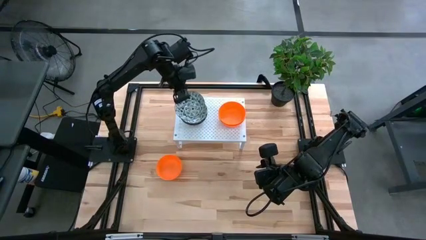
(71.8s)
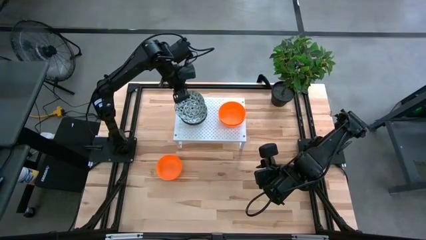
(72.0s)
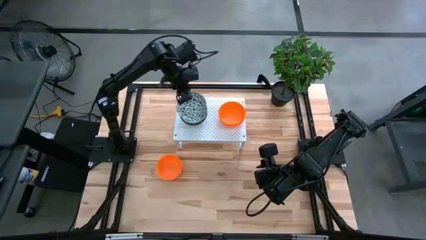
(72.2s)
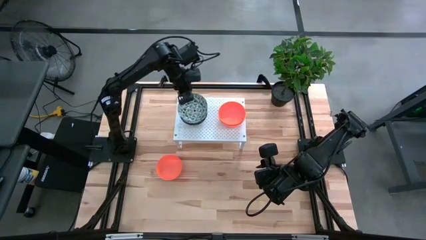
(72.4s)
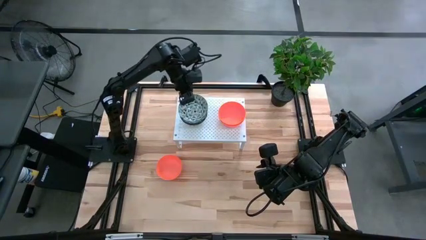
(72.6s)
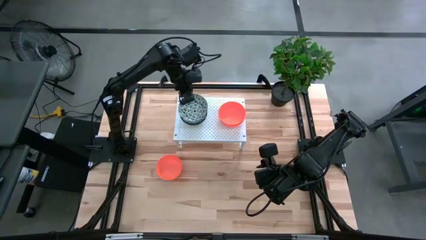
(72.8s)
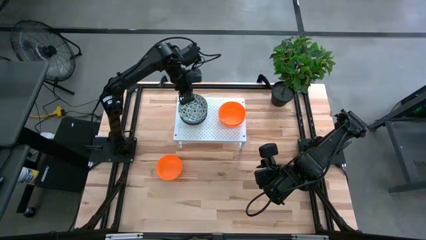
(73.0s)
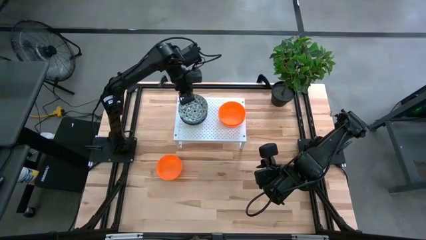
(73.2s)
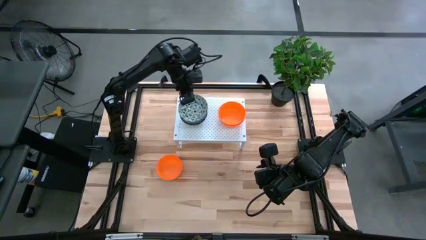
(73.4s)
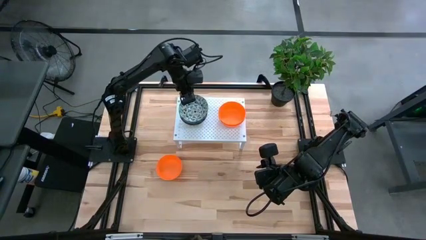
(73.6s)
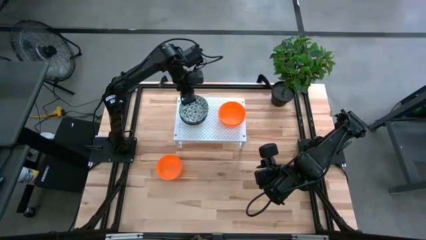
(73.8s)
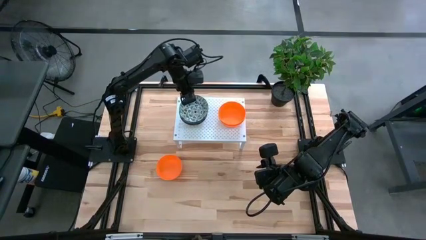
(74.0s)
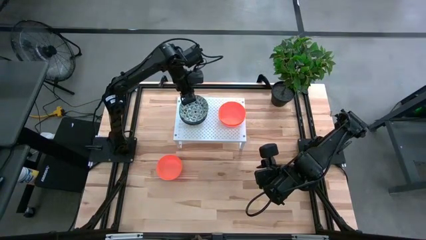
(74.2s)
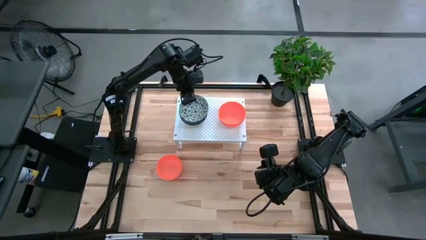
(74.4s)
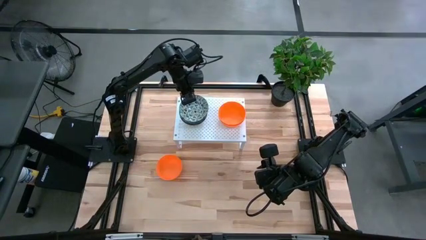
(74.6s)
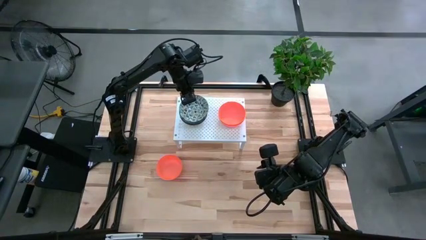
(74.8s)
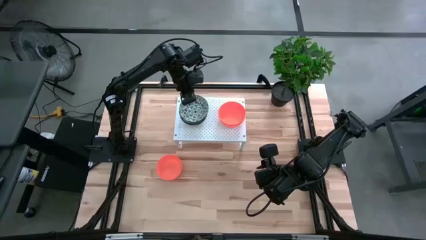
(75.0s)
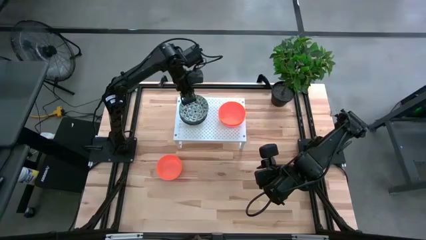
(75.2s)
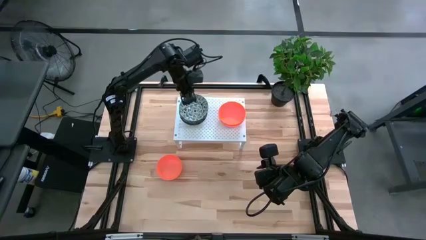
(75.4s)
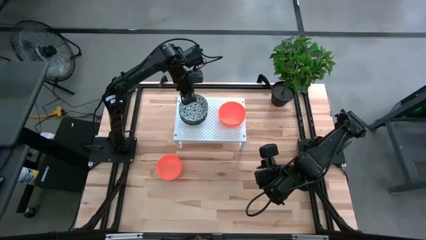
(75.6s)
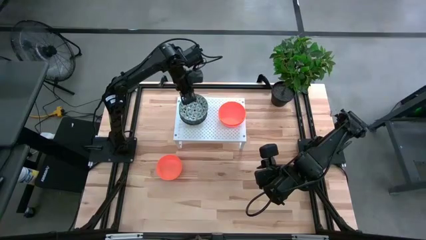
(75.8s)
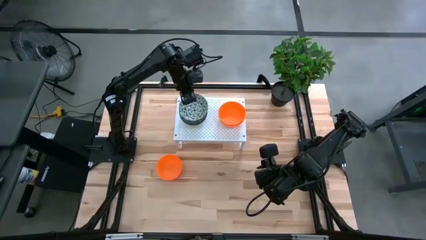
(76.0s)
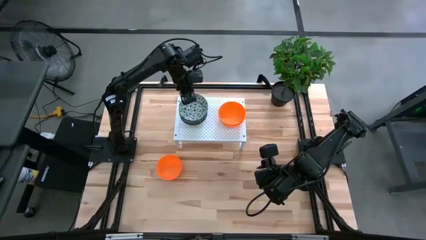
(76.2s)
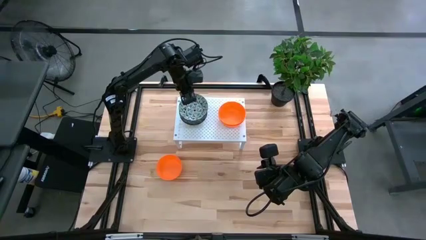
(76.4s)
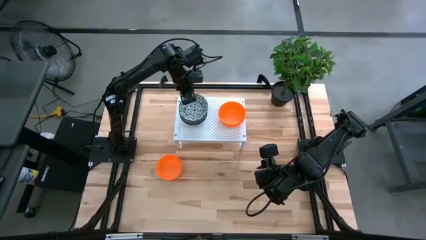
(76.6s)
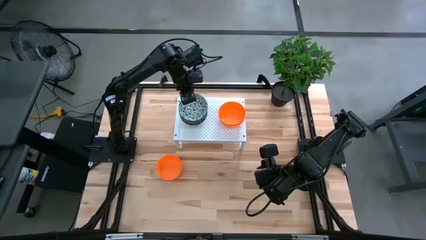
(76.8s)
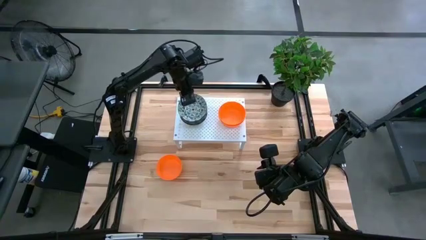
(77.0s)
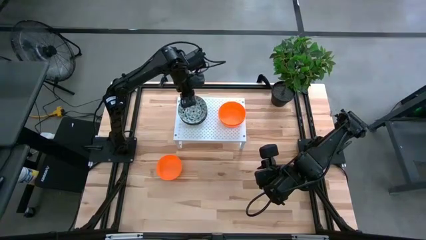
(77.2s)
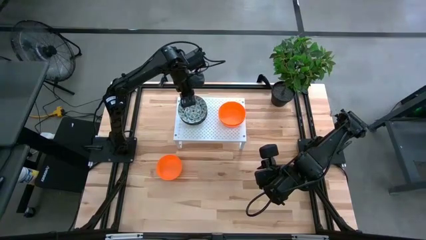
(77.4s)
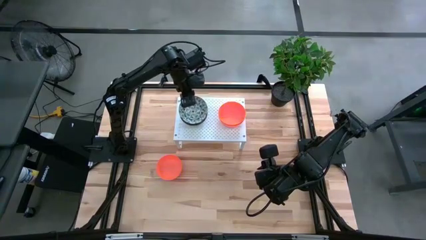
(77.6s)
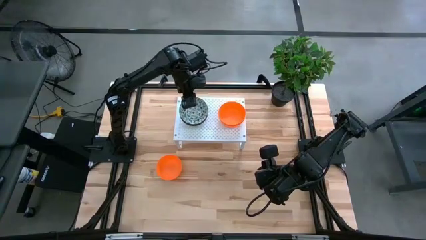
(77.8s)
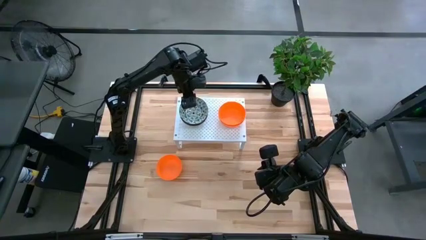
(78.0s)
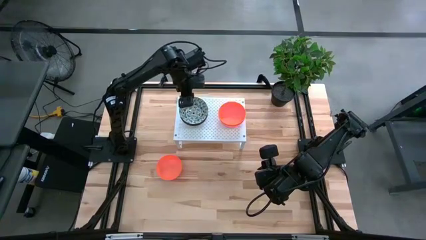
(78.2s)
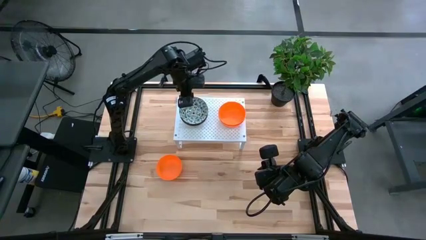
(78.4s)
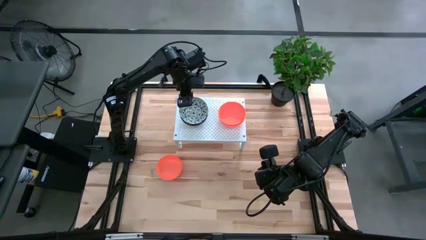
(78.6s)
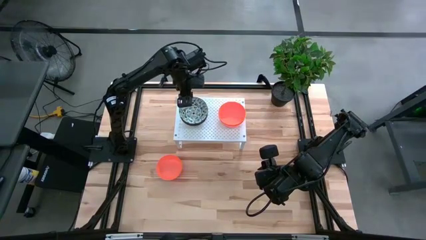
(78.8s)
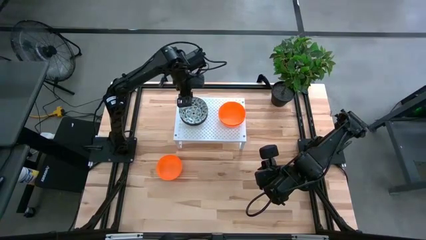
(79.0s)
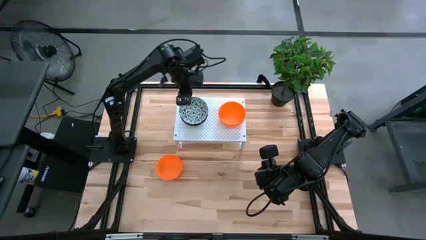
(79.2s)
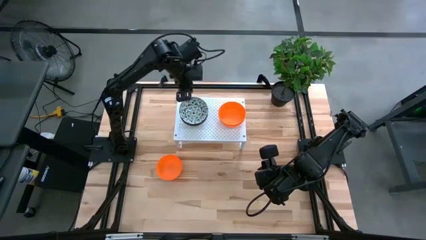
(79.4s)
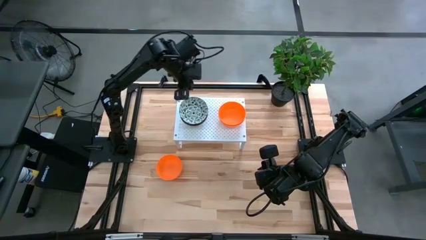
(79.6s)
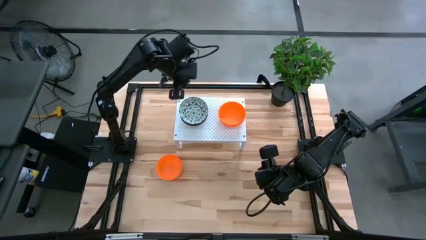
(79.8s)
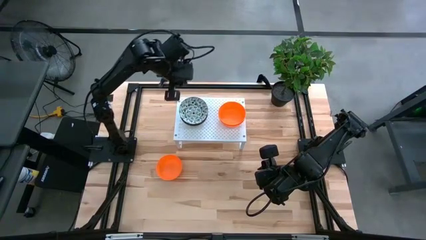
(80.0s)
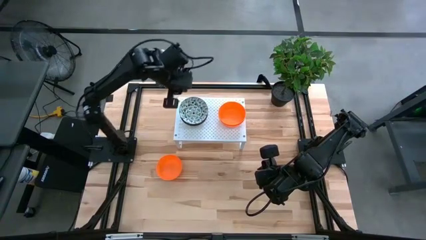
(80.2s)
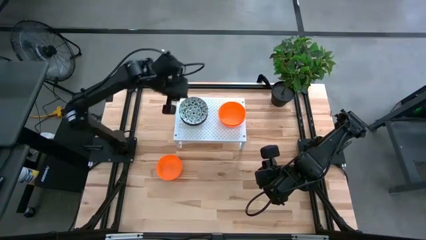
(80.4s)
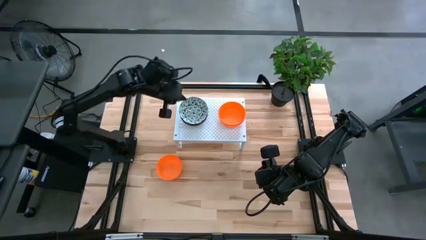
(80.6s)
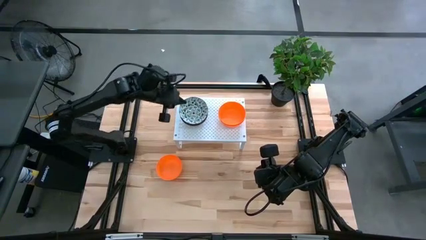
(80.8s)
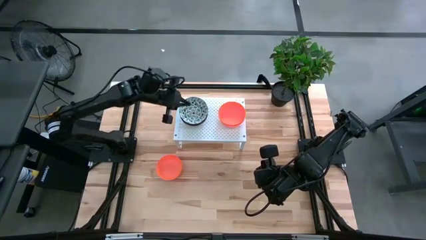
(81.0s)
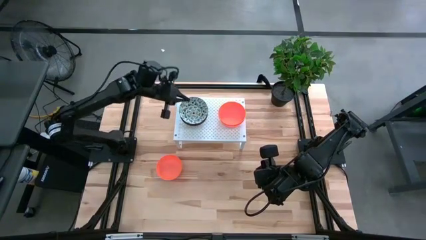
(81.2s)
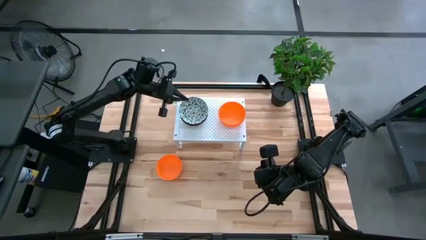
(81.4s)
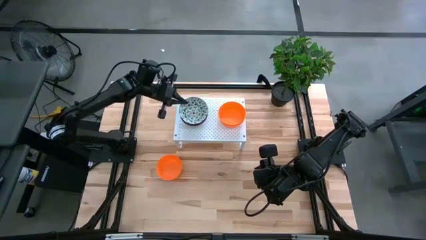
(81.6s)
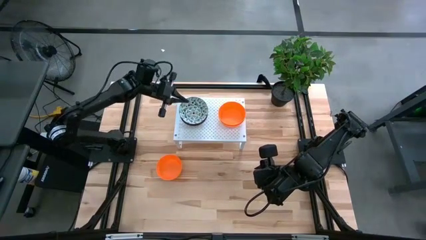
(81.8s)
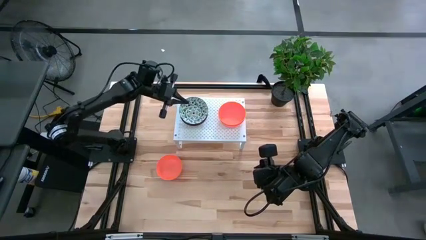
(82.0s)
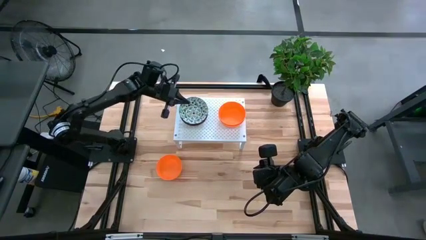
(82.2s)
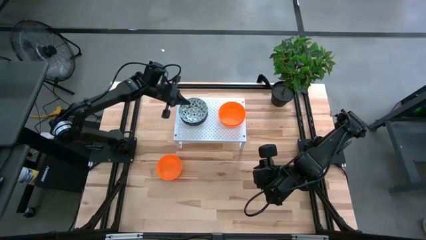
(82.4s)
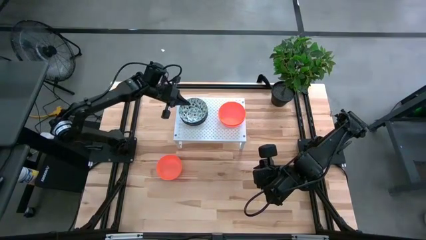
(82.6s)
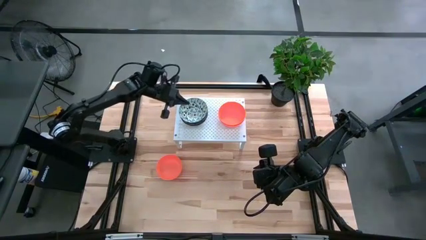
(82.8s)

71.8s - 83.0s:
Task: Pick & Place Mini bowls
Stack the green and white patterned bowl on top of the green and white patterned bowl on the shelf

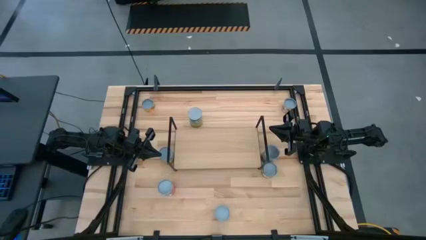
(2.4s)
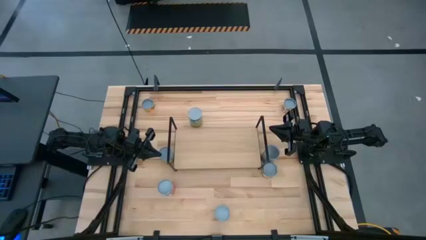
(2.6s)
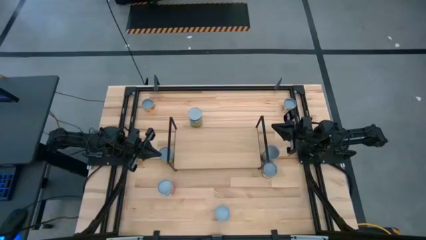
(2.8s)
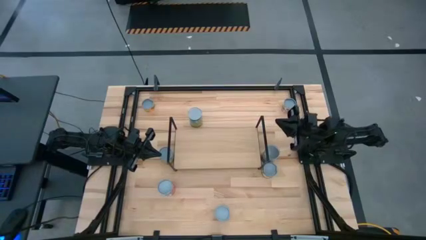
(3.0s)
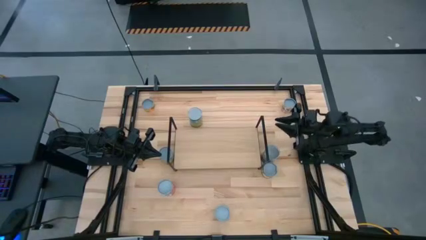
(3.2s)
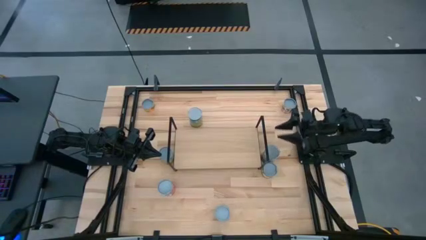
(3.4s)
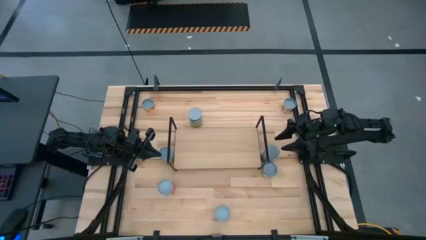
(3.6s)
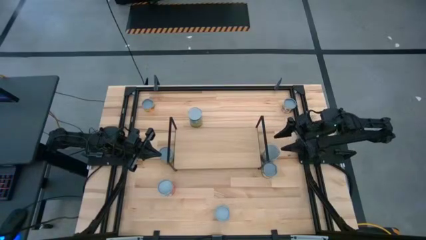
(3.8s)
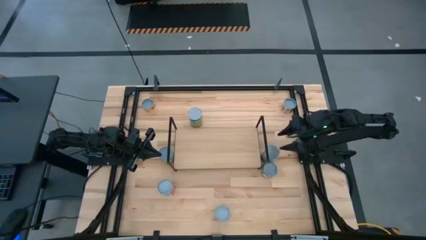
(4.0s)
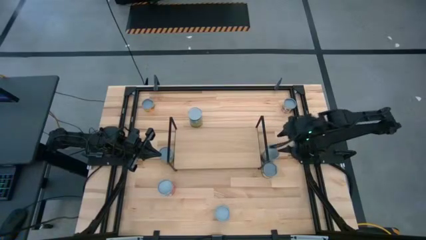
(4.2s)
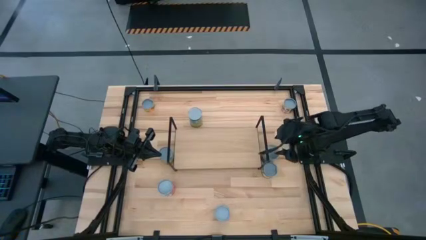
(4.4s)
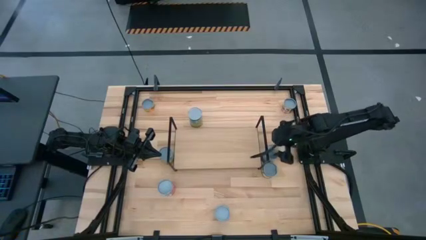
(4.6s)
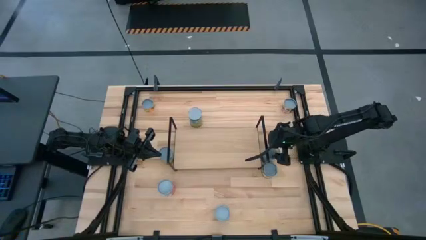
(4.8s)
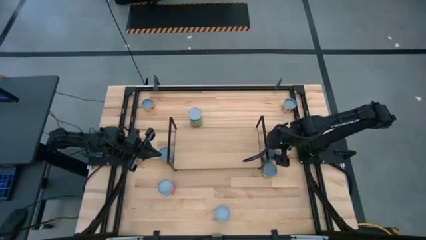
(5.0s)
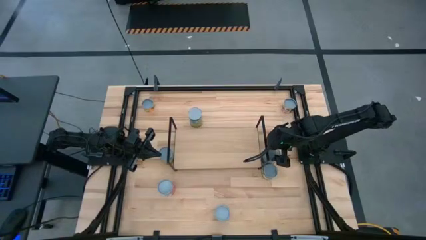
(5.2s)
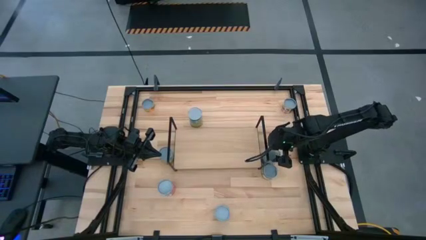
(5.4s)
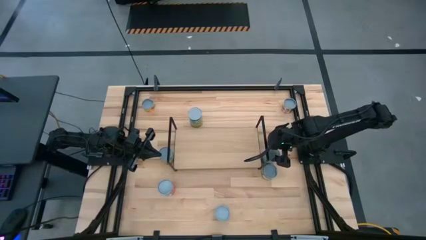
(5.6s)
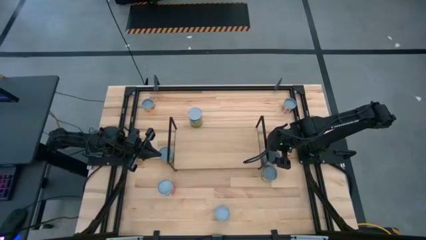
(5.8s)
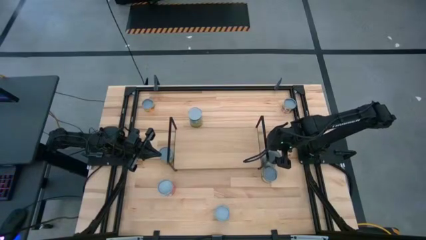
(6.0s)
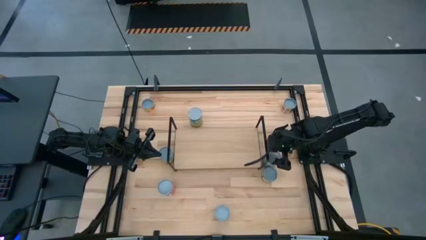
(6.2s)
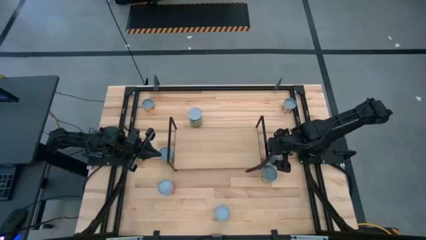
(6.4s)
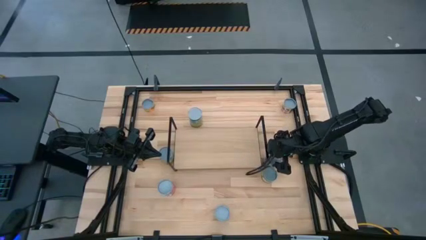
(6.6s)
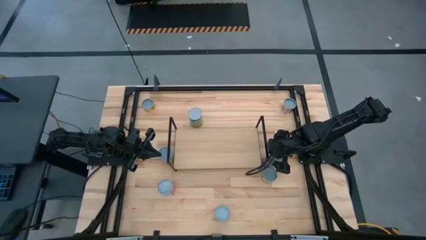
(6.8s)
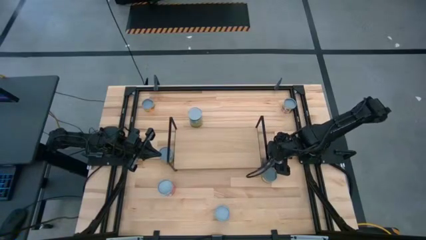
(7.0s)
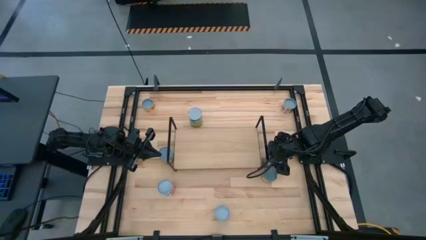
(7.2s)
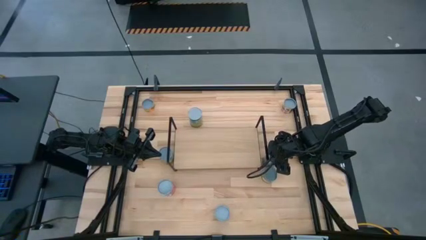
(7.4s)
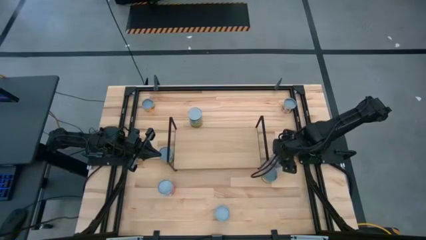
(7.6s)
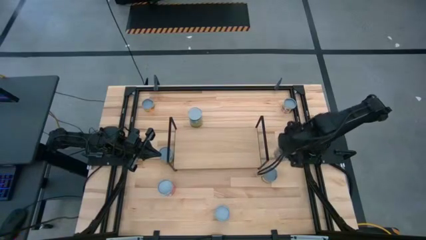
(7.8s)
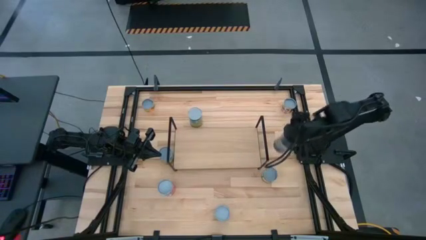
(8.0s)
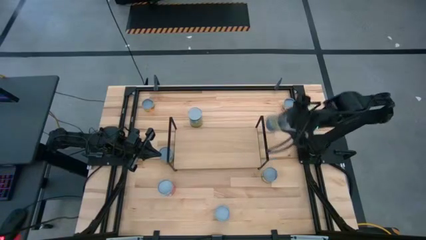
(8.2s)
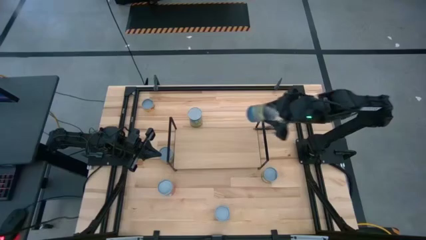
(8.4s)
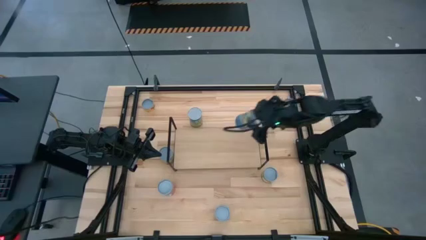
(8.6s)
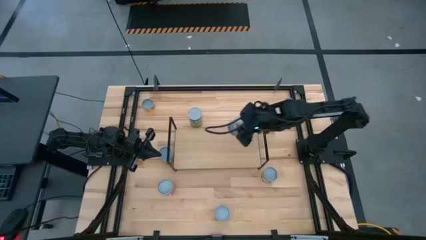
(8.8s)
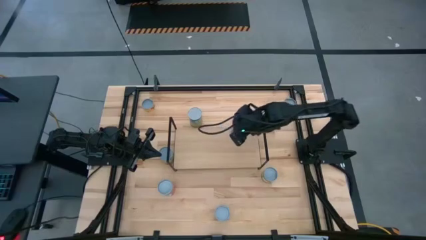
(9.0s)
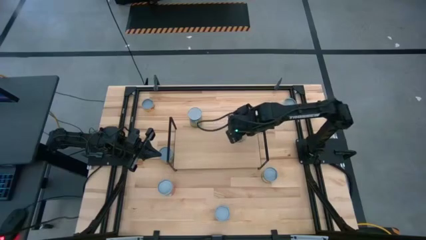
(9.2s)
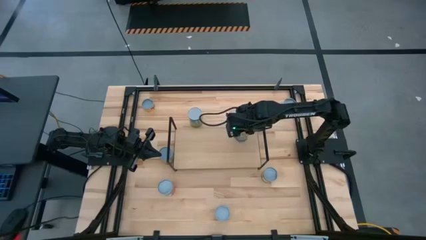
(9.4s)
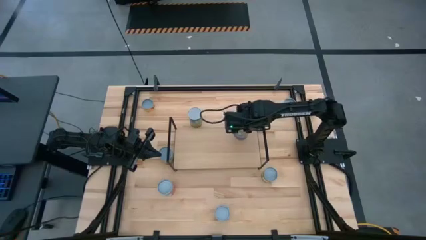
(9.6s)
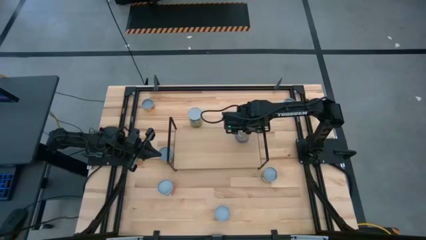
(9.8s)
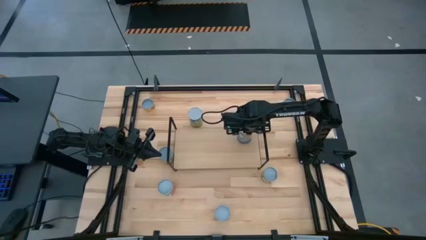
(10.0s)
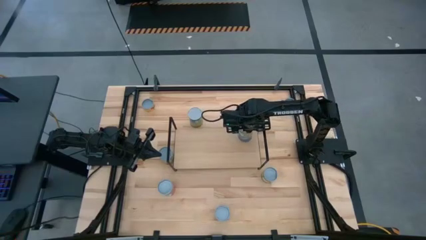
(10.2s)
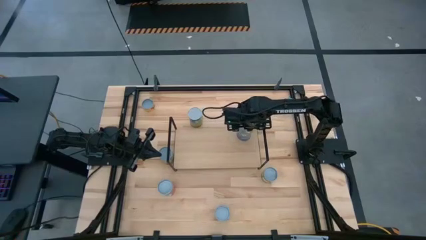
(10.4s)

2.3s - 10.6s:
Task: Pick and place cans onto a shelf
Put the canned peas on the shelf
